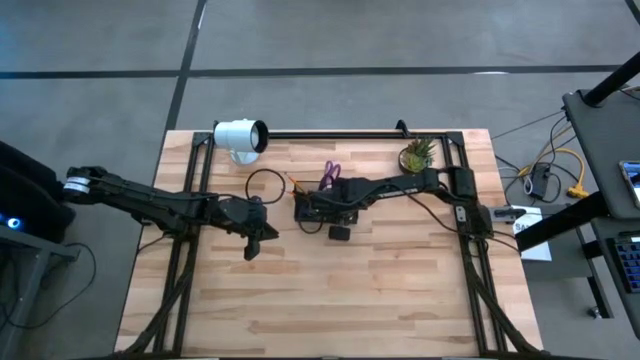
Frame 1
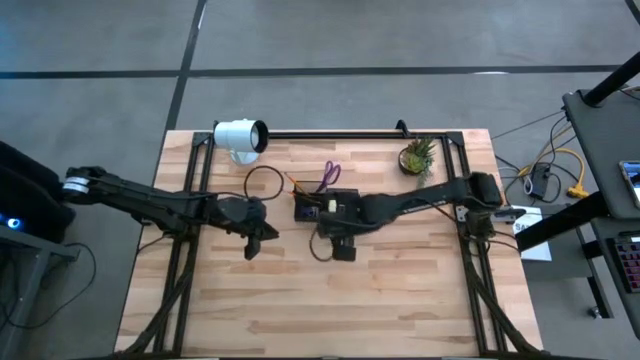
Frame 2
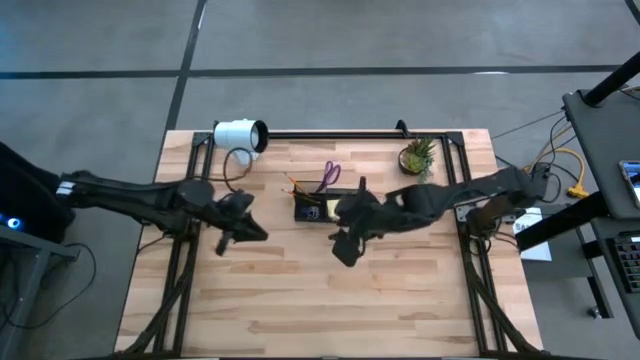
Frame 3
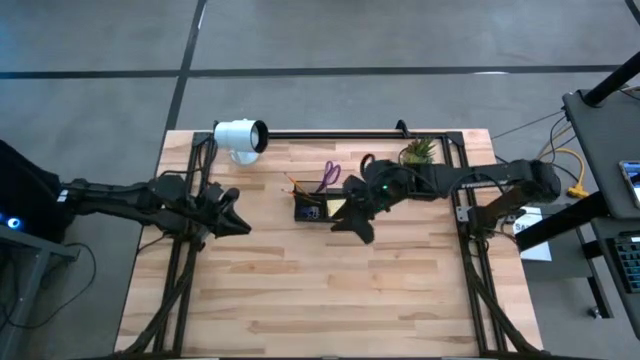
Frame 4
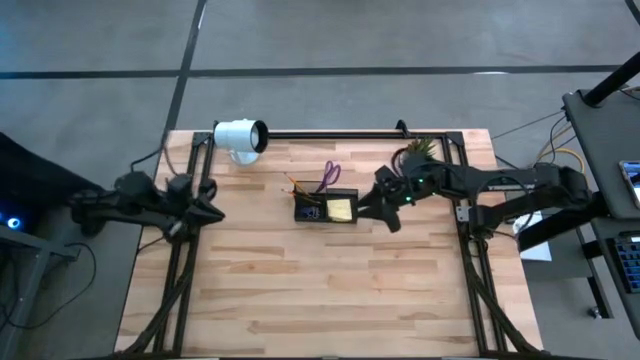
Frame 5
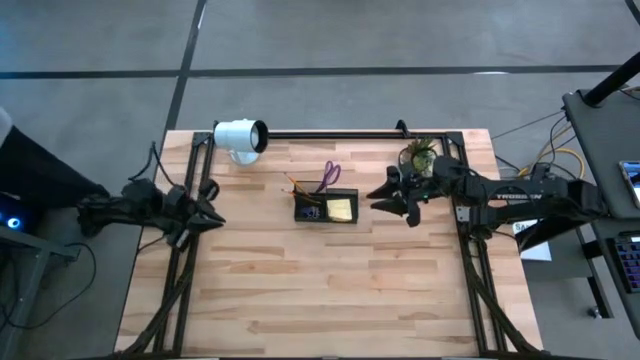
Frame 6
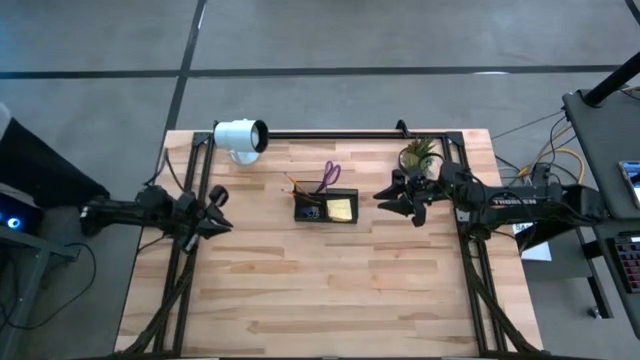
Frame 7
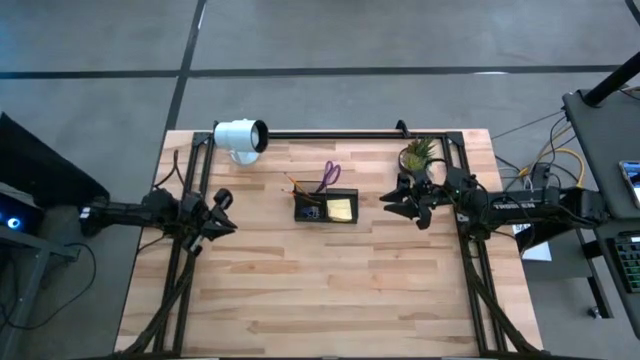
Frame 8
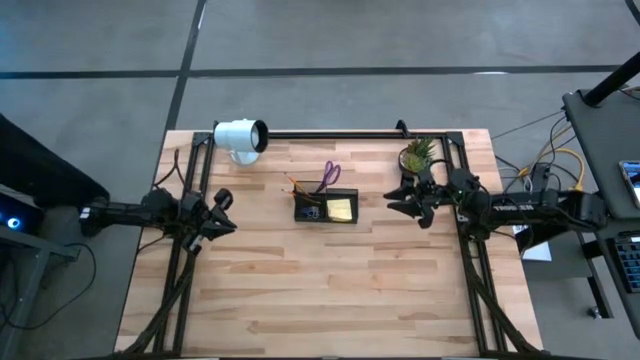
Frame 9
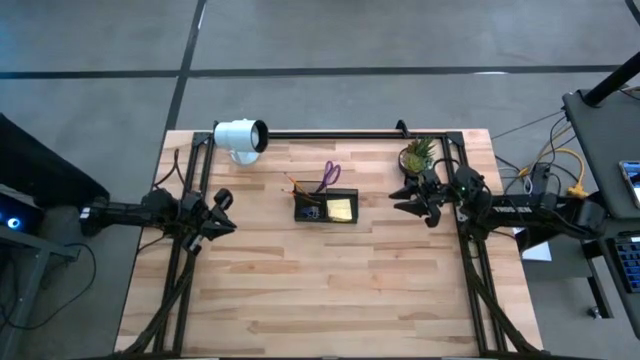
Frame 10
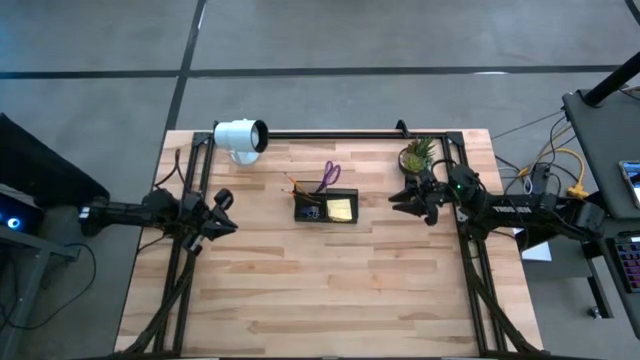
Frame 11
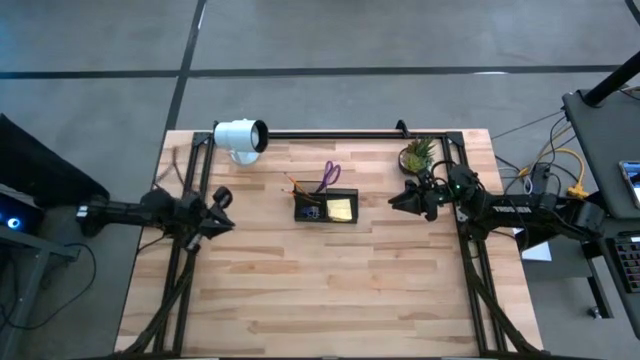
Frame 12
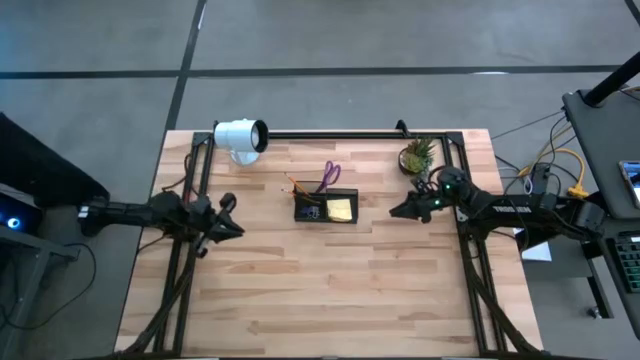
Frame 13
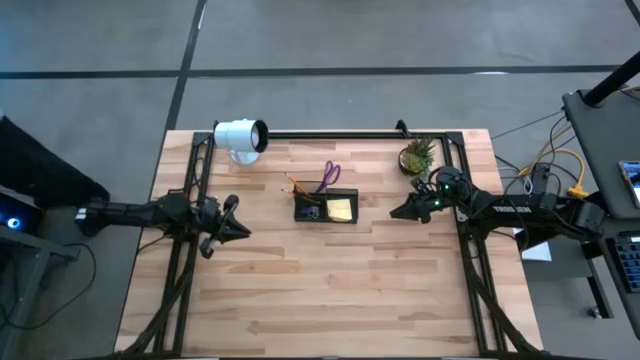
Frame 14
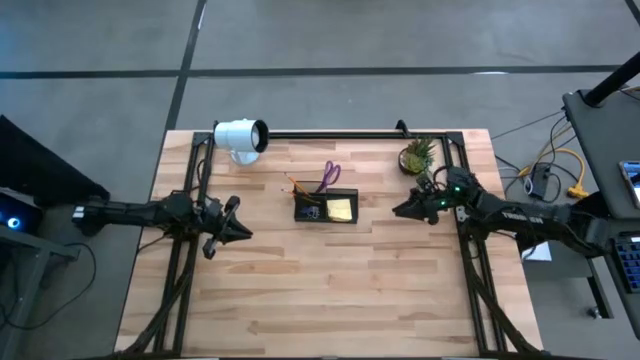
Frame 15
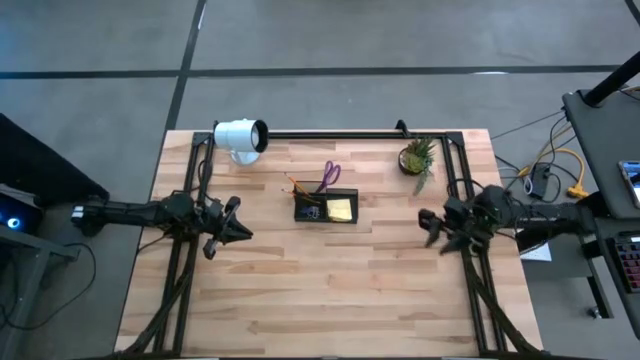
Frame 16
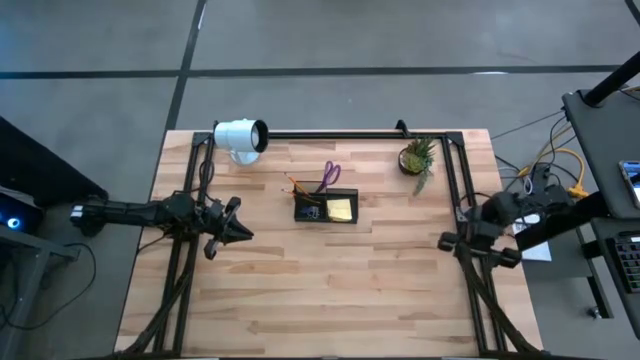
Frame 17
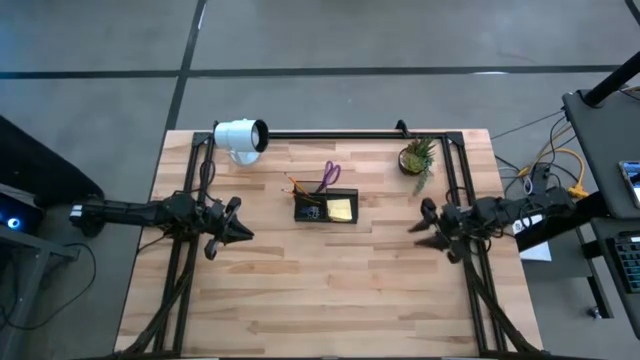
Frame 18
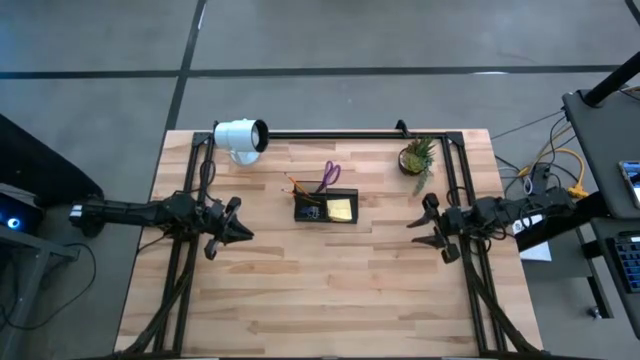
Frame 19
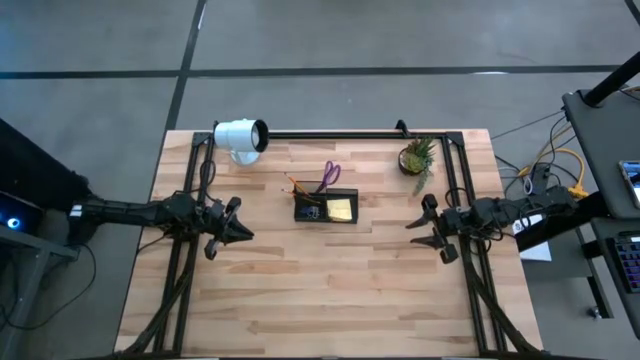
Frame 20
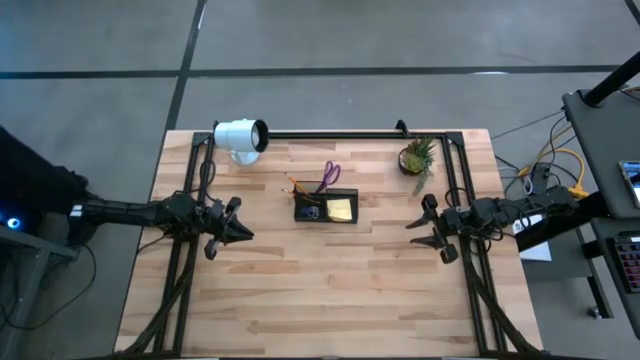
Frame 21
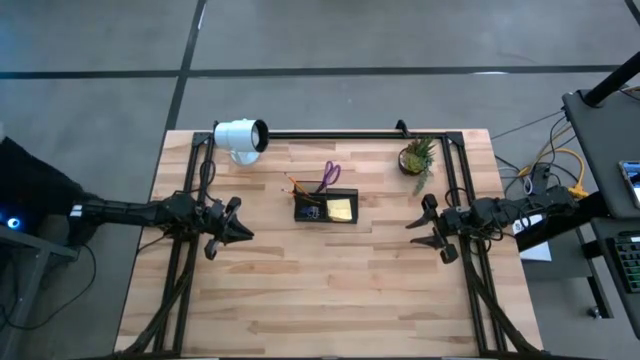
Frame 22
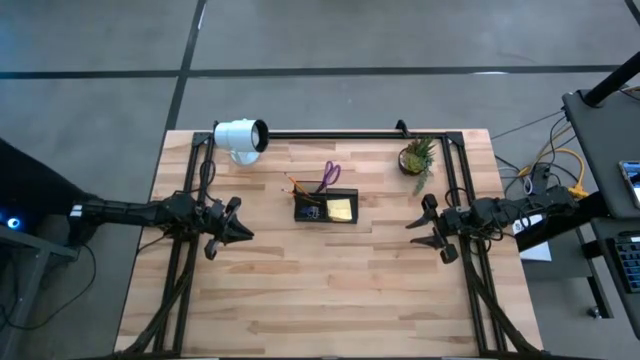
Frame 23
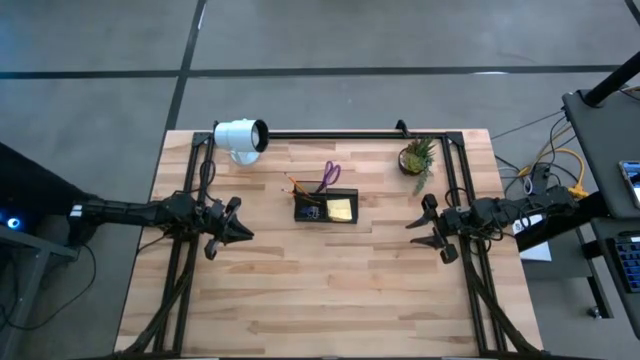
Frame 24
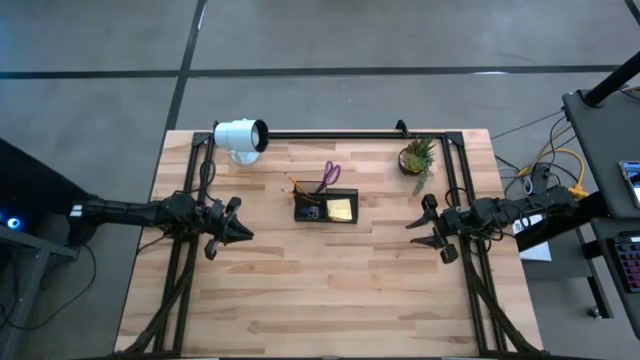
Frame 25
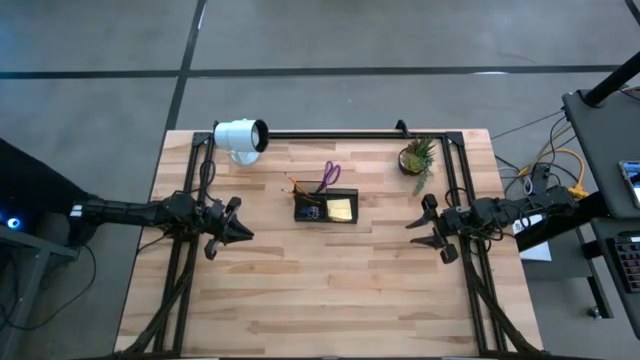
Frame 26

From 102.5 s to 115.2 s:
Task: Pick and place office supplies into organizer
Return to Home Position

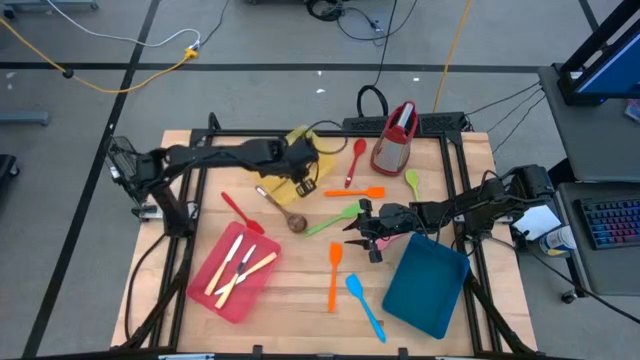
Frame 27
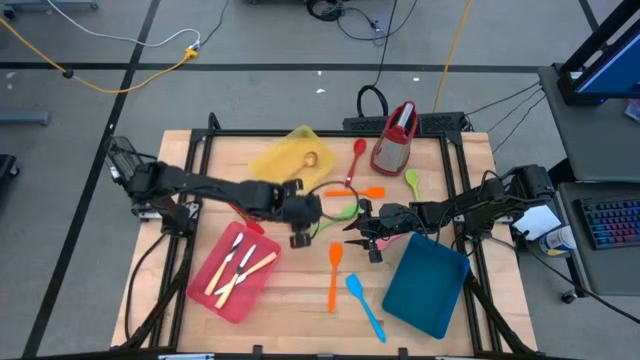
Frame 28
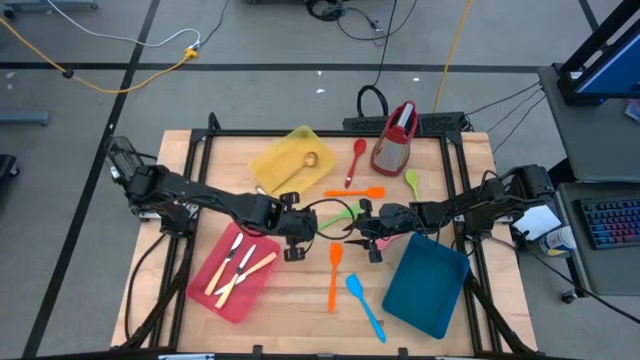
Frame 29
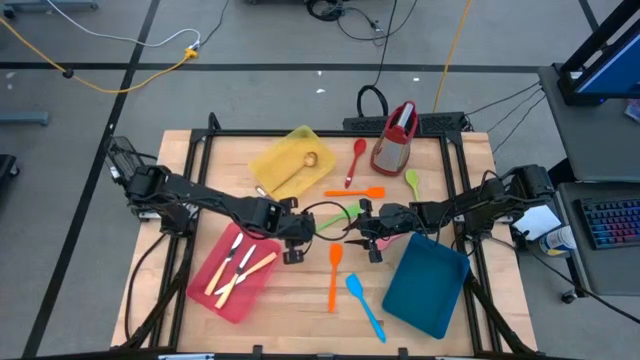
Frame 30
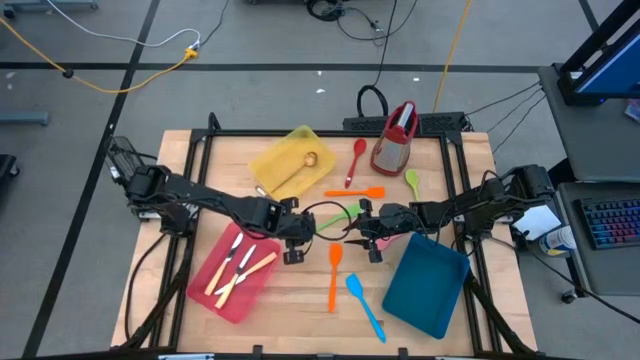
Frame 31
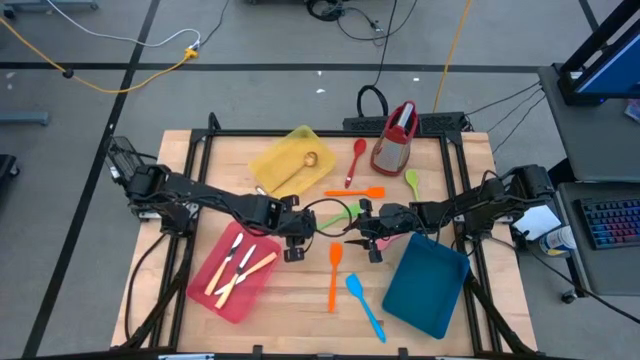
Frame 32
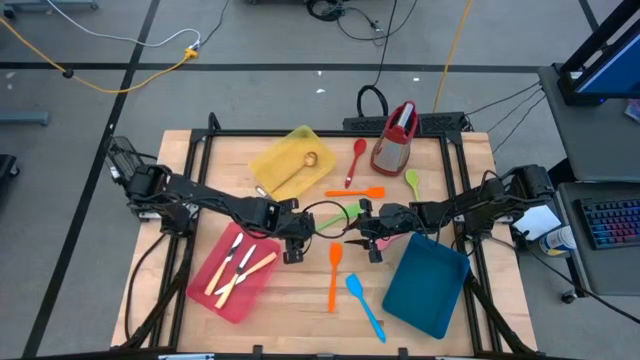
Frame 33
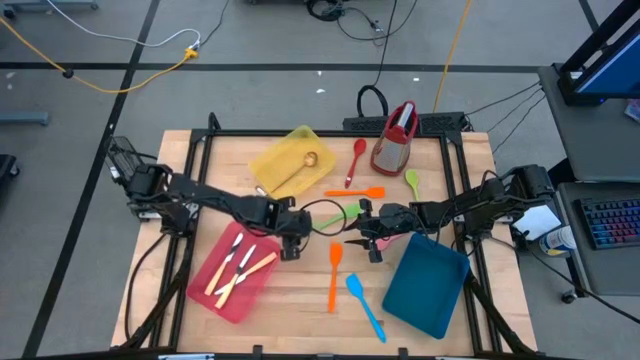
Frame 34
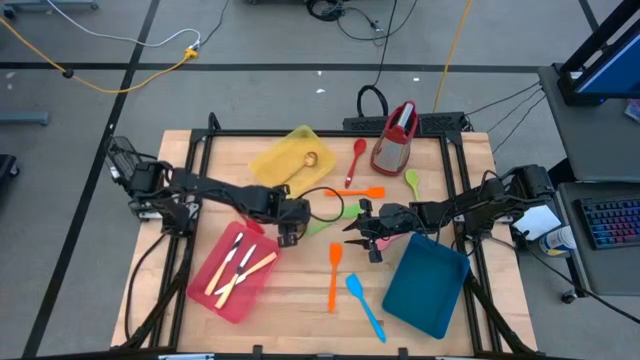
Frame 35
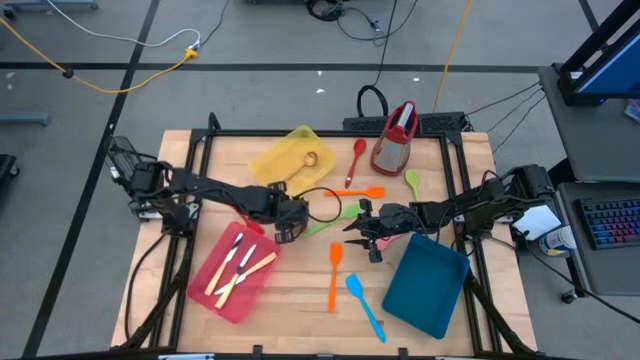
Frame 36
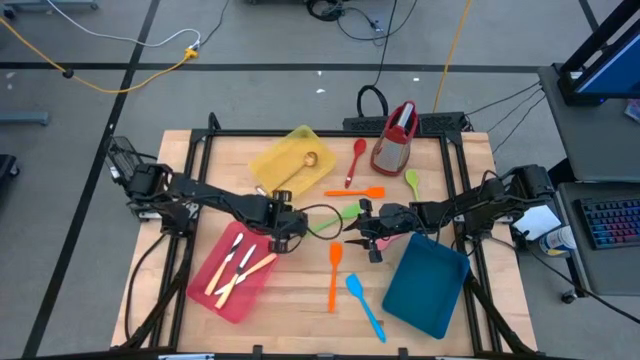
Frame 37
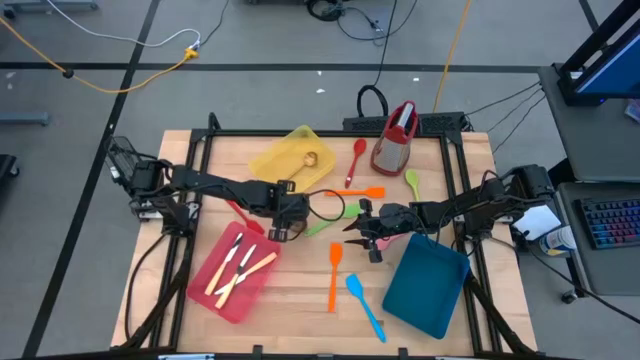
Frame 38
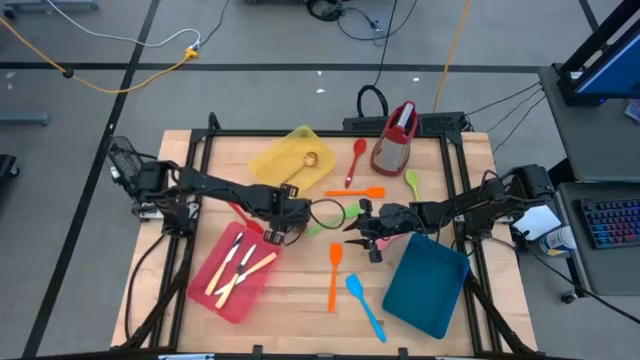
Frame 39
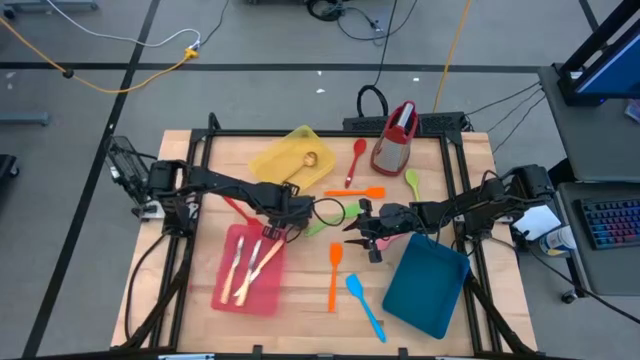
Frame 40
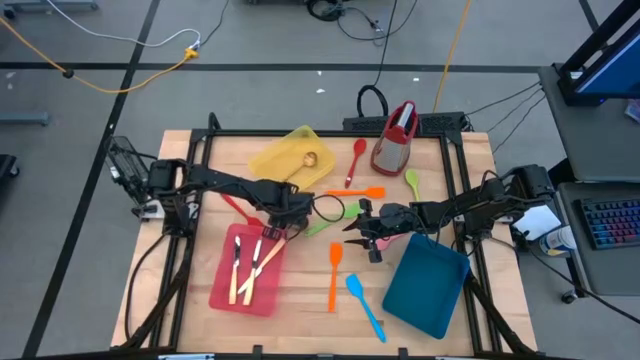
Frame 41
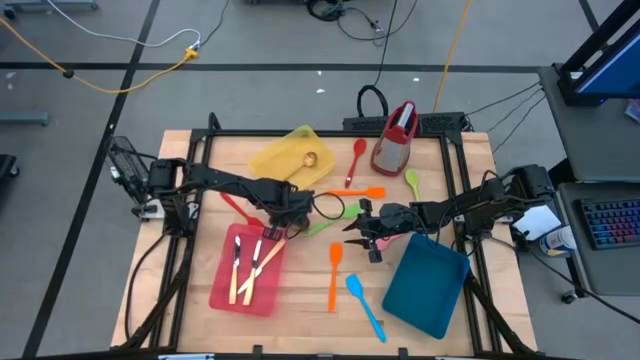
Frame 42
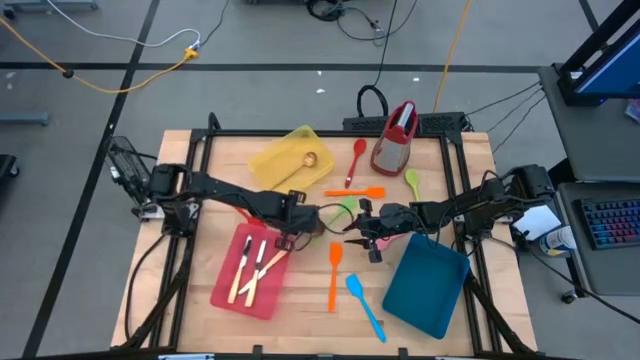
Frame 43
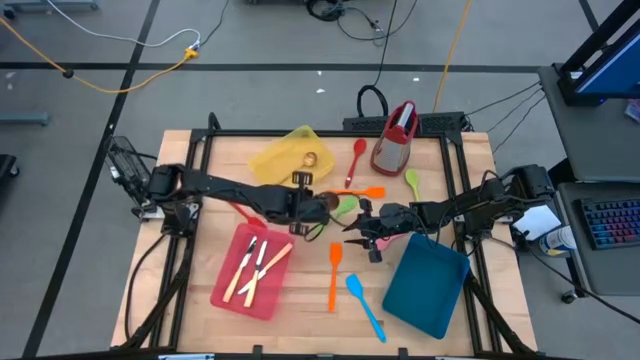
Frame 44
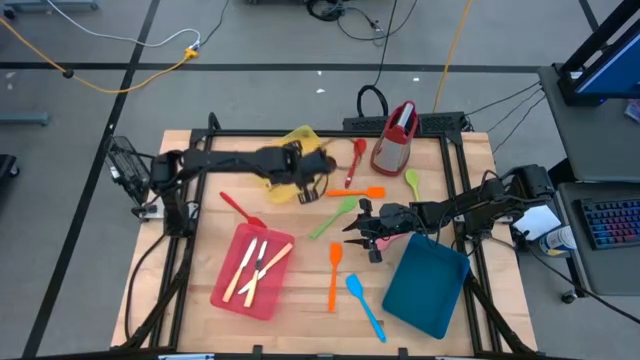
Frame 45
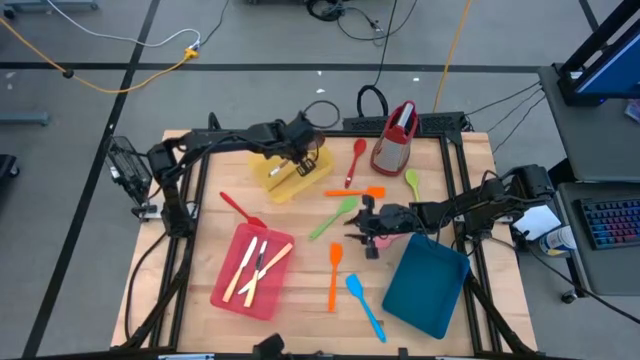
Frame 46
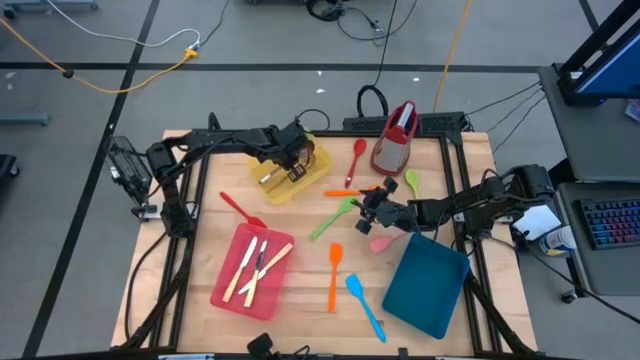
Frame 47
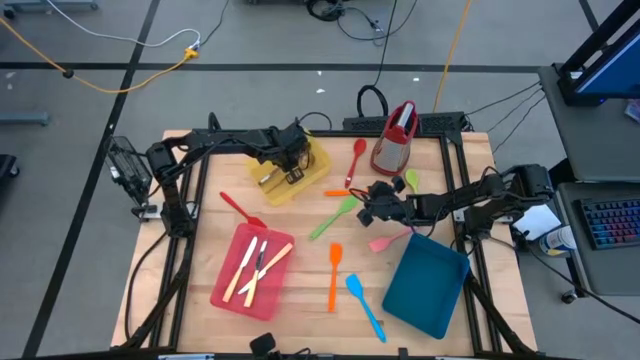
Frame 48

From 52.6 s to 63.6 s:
Task: Pick & Place Kitchen Items
Put the brown serving spoon into the yellow bin
